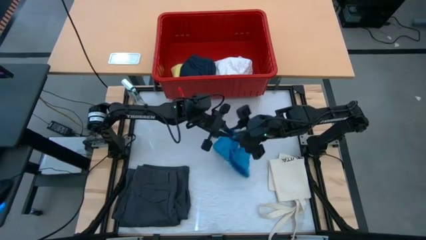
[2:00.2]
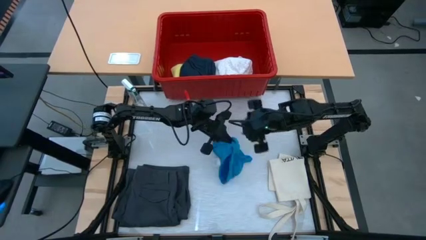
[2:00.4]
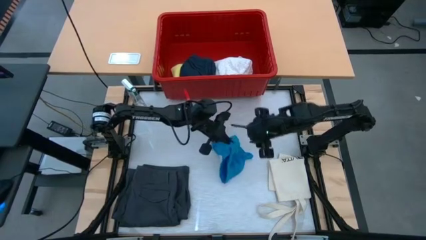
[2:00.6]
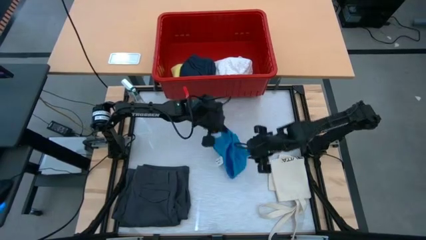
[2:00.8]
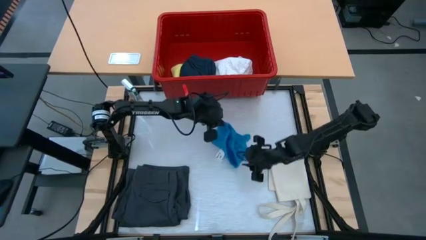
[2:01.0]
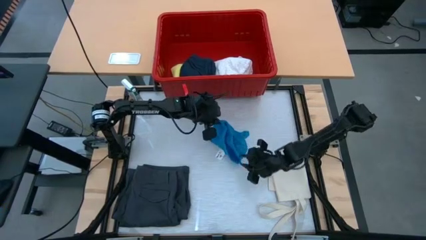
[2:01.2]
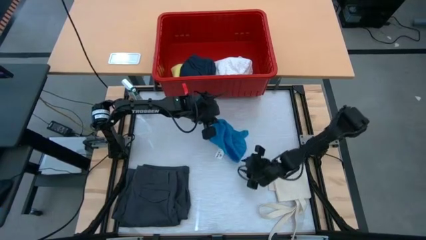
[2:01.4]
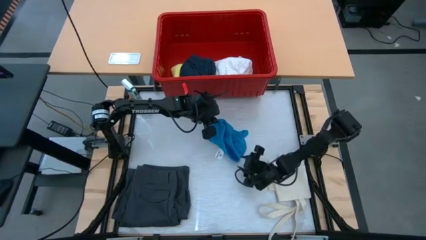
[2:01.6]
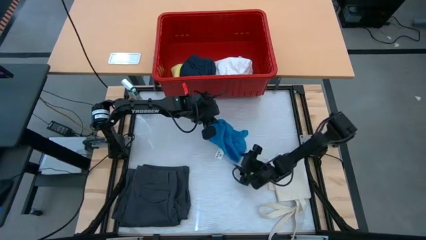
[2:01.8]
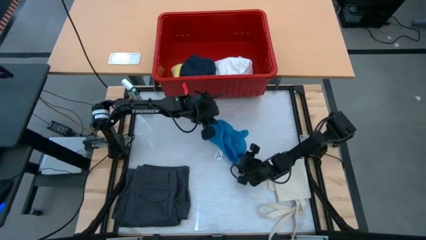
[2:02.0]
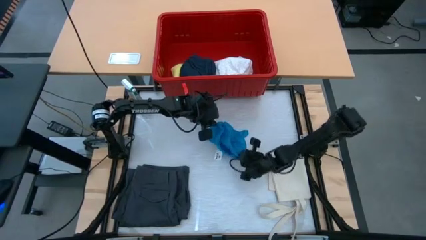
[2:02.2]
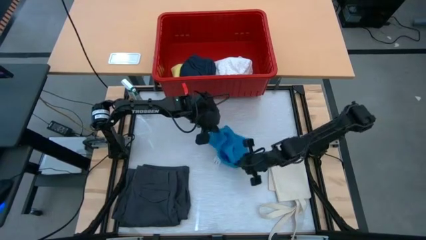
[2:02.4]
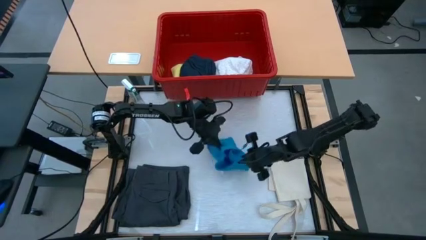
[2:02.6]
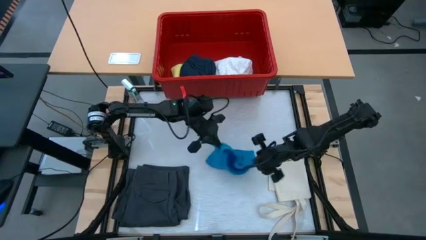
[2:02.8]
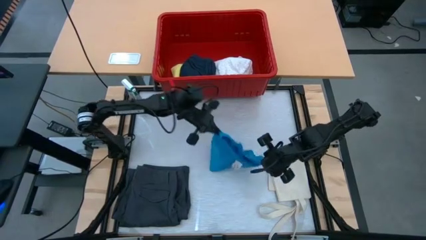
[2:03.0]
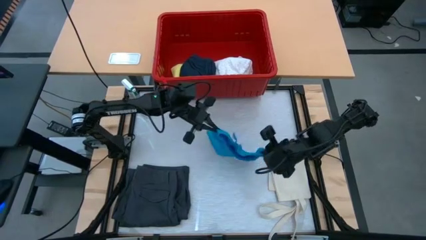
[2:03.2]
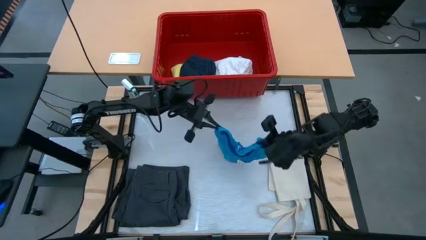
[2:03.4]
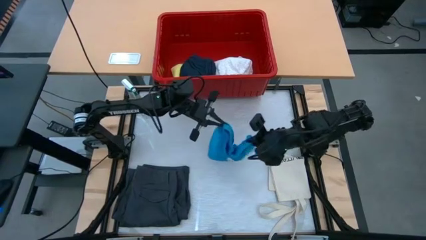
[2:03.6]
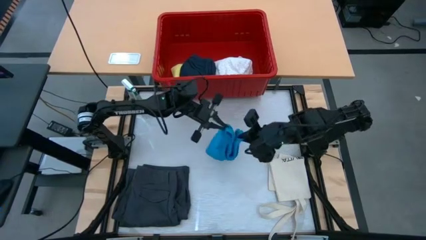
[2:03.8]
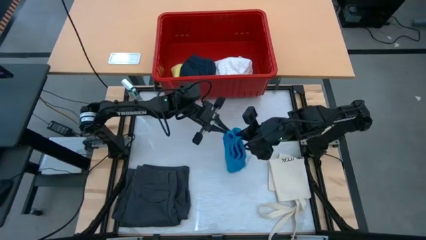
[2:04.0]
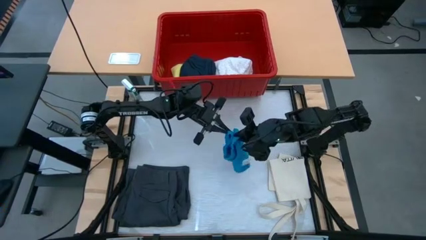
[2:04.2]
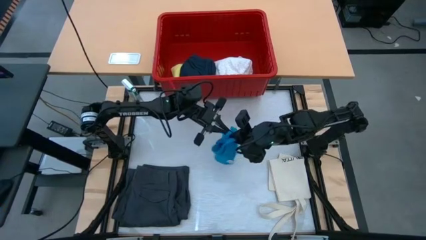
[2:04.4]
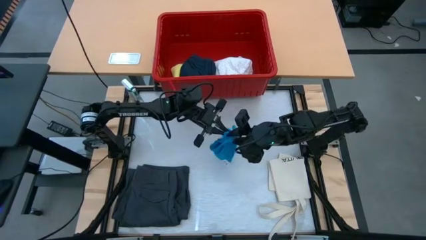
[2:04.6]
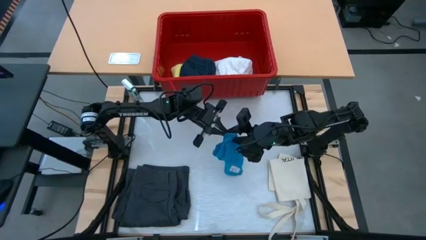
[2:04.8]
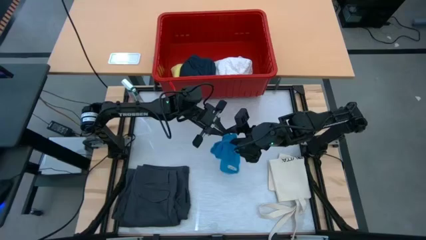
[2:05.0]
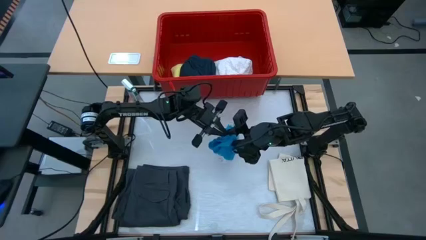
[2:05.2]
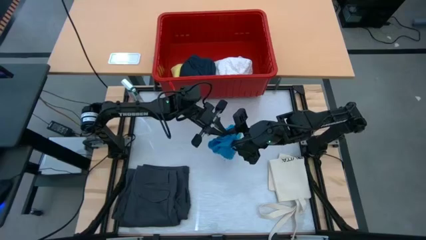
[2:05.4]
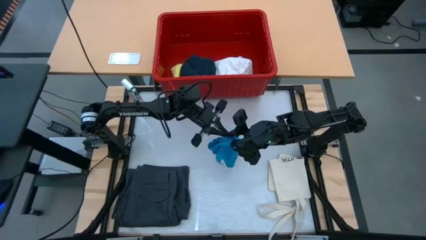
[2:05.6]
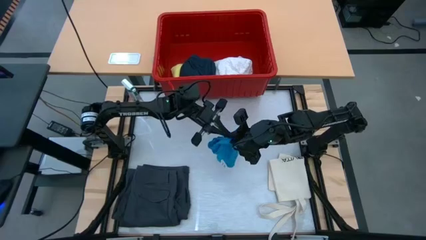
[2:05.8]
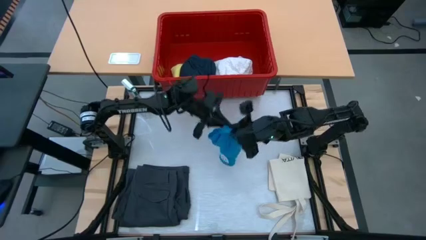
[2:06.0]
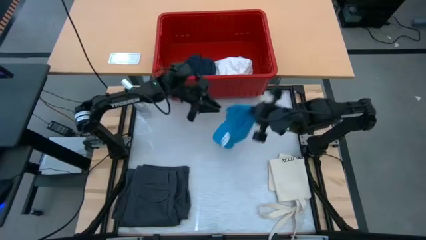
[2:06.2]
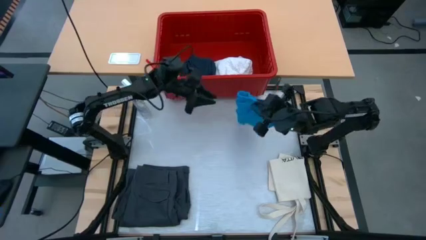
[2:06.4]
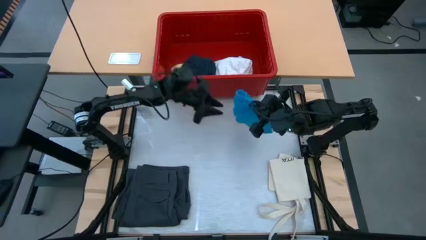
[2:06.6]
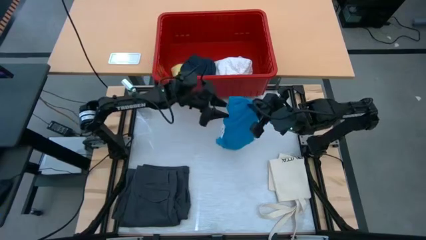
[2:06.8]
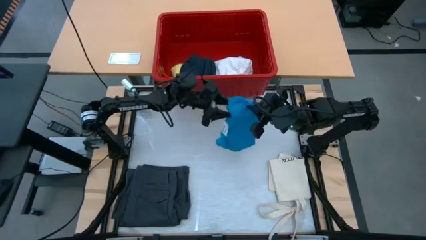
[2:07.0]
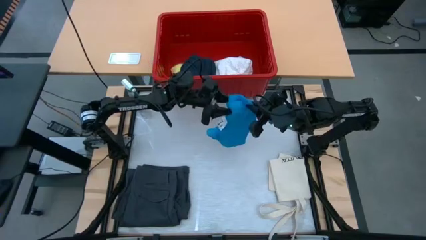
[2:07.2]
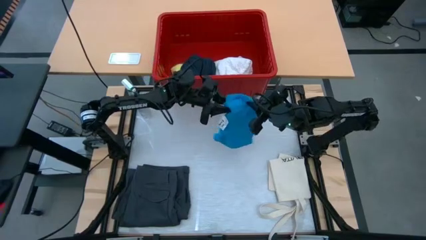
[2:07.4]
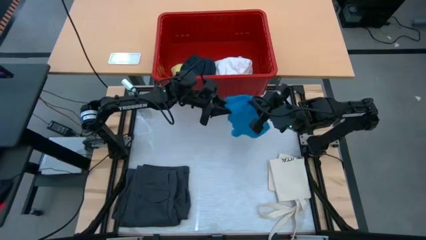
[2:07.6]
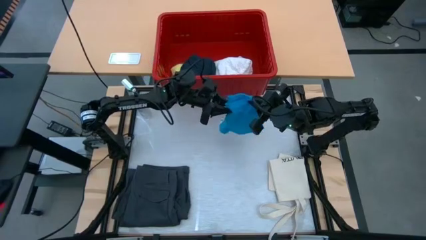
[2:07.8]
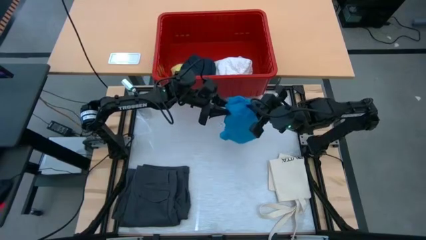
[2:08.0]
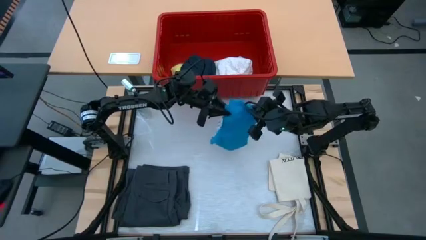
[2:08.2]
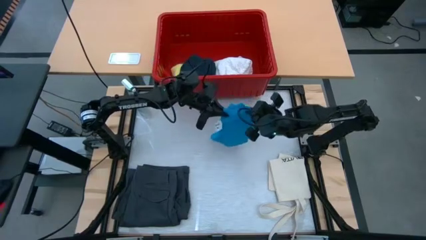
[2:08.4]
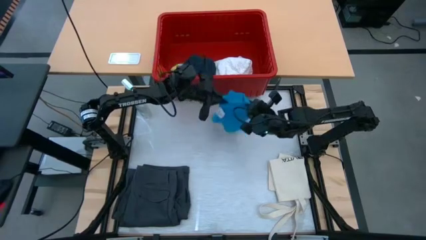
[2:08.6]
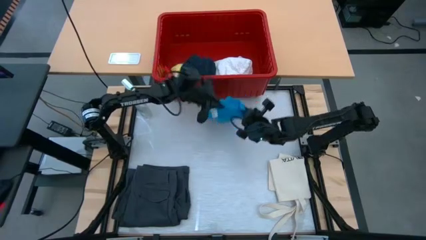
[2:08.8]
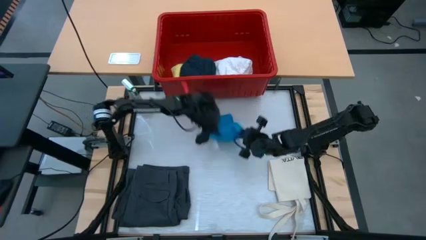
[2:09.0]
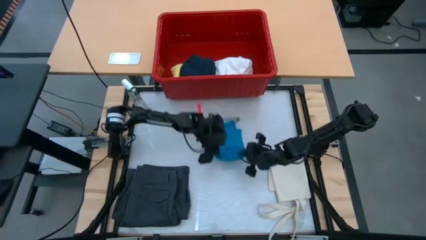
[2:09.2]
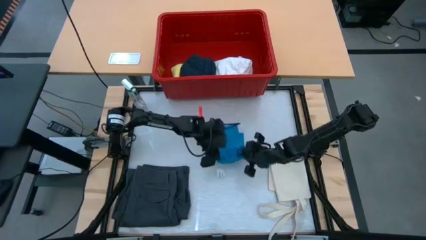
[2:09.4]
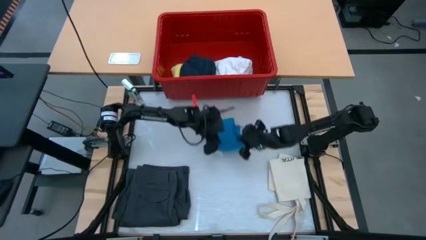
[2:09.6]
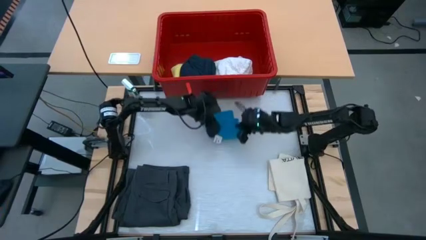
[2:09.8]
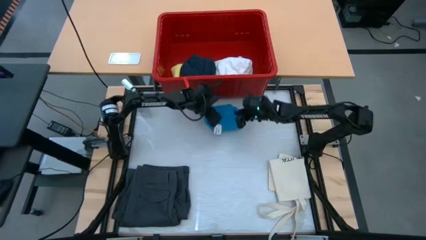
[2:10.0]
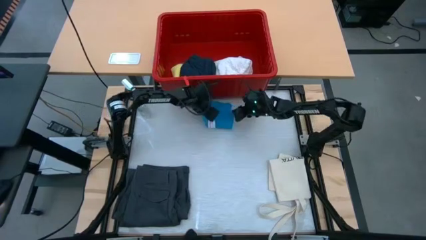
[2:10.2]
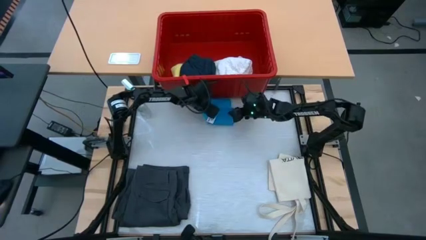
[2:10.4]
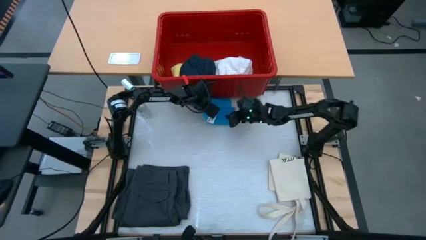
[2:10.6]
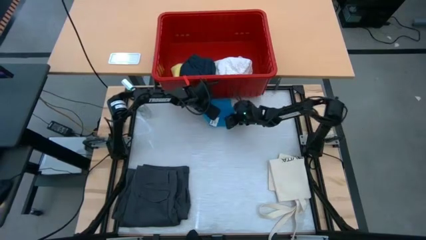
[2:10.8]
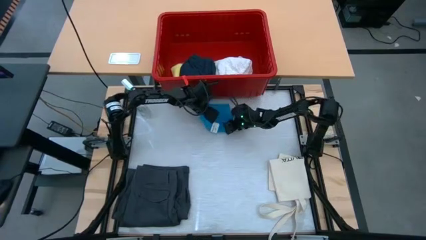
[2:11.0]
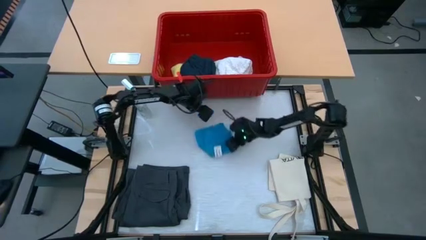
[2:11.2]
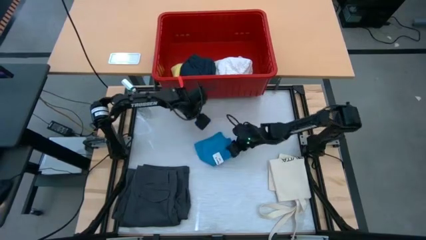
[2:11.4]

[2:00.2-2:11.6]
Task: Fold laundry
Fold the blue shorts

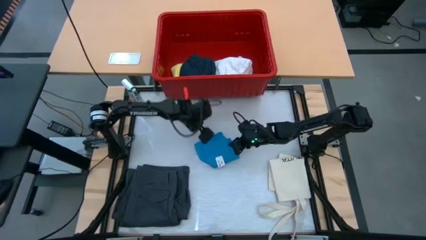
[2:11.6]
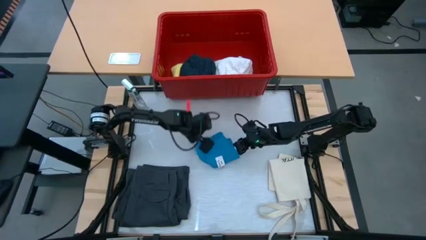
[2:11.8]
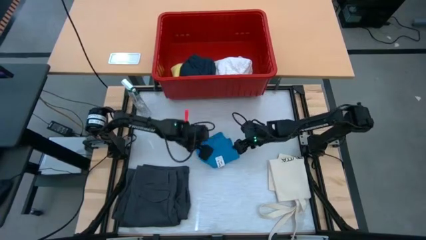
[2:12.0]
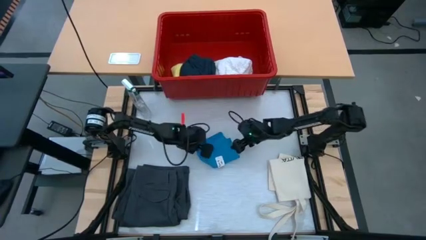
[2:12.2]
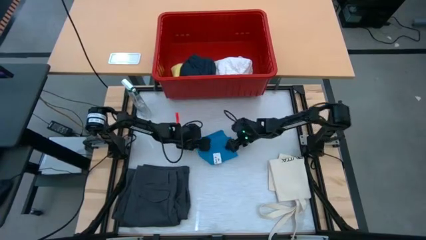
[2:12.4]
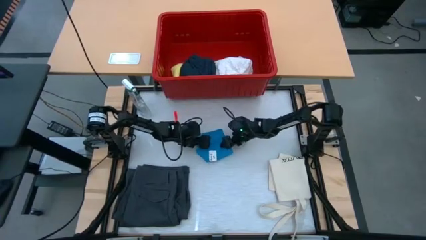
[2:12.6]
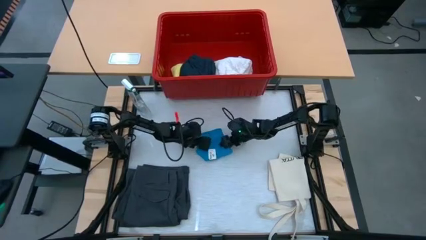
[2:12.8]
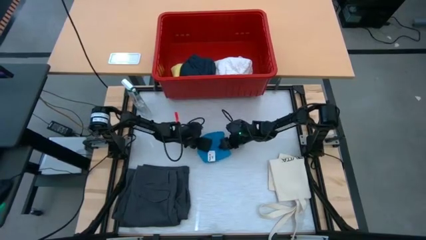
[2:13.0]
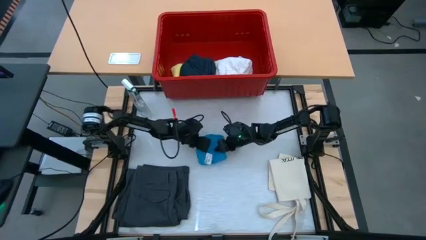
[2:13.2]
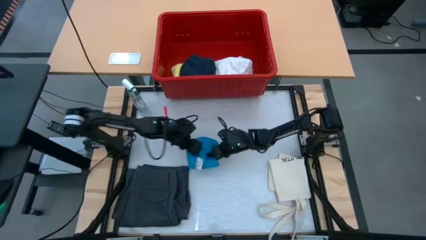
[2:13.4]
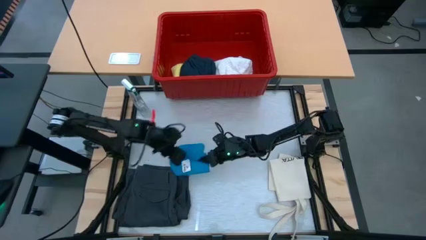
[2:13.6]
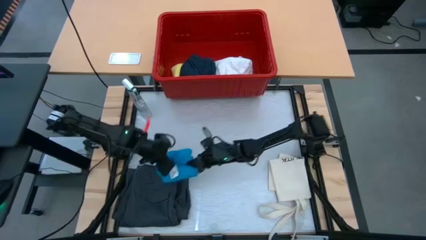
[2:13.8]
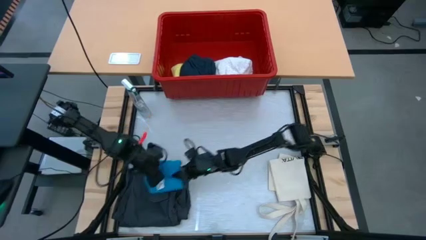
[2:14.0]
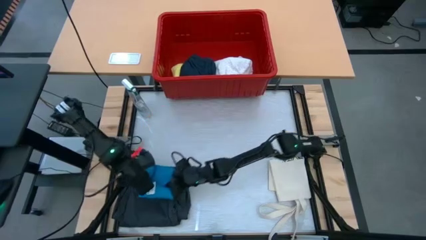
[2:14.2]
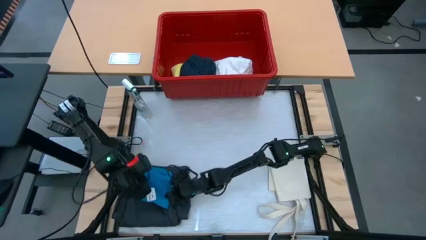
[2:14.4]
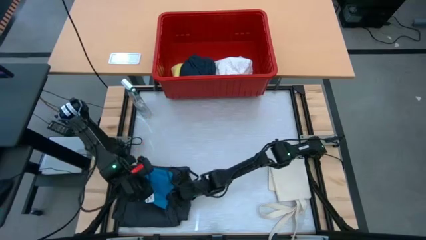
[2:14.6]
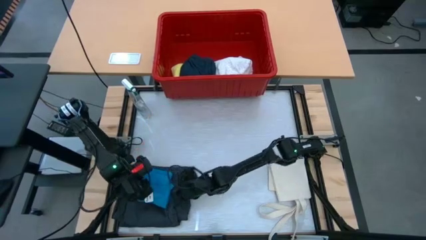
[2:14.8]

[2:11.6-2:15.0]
Stack the blue shorts on top of the dark blue shorts
